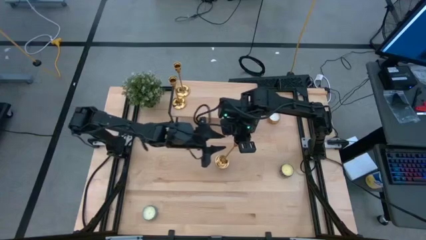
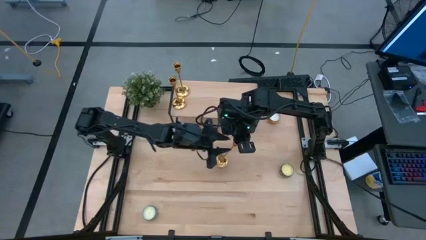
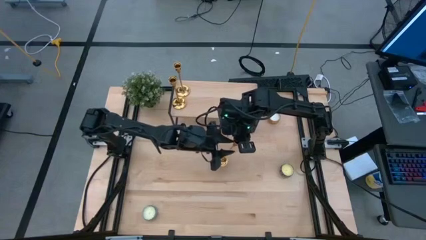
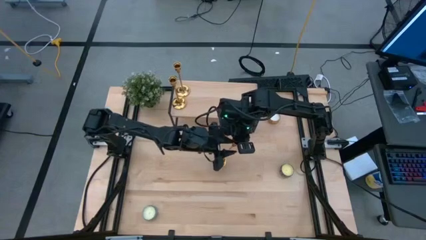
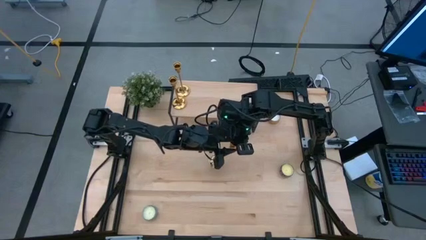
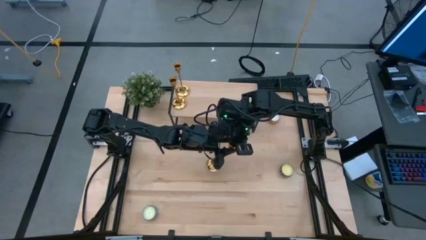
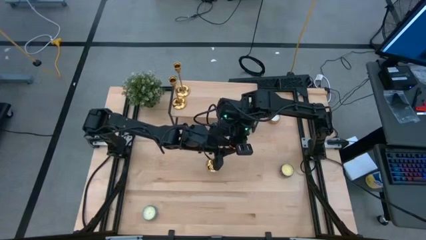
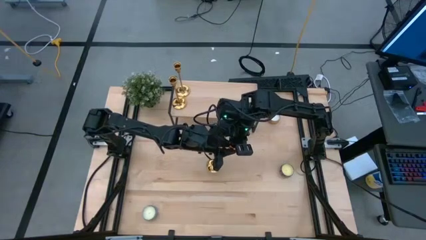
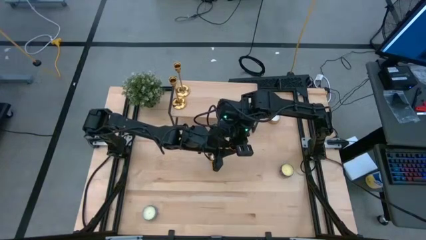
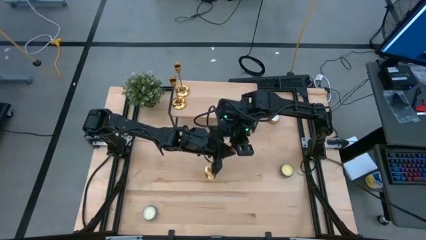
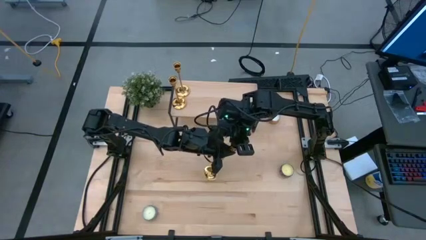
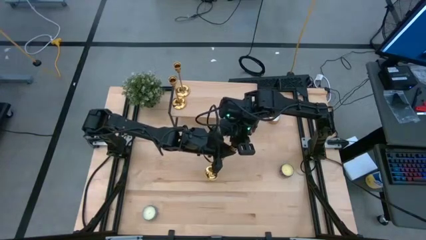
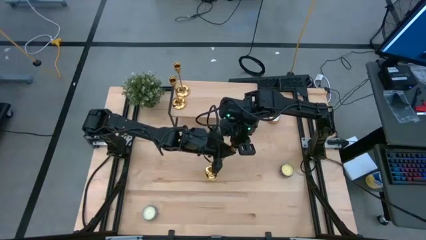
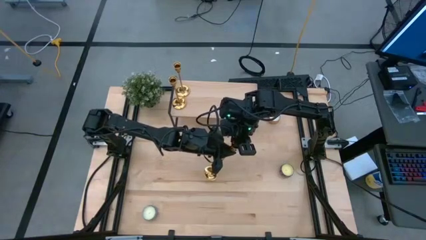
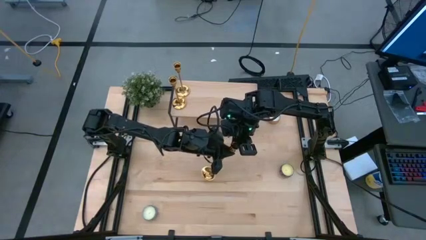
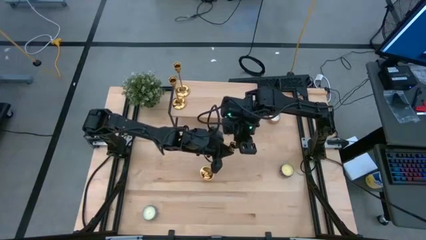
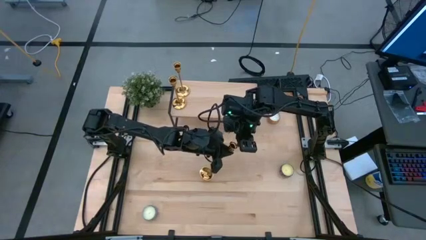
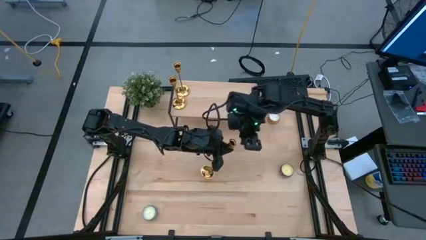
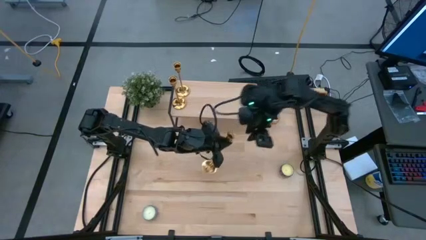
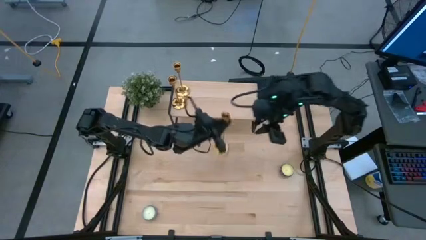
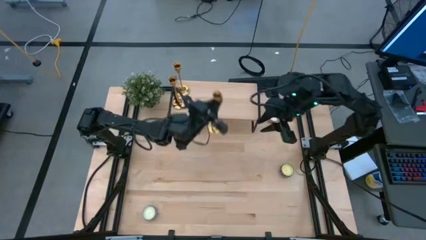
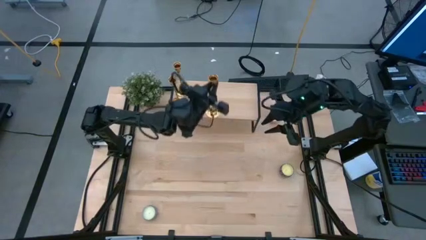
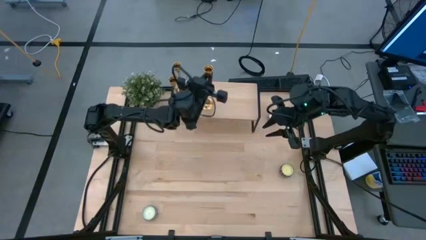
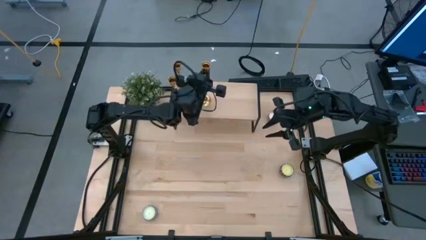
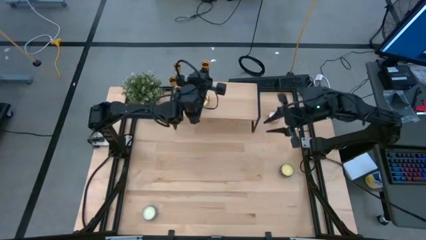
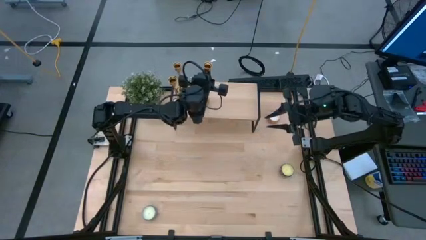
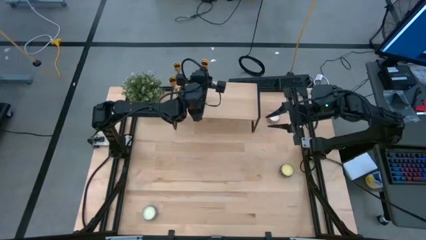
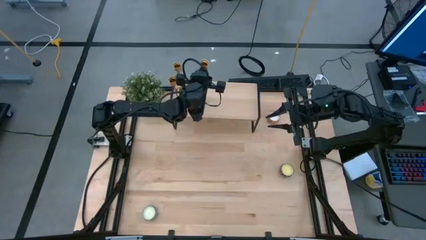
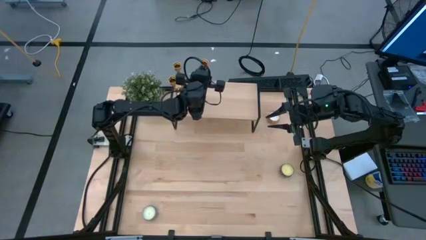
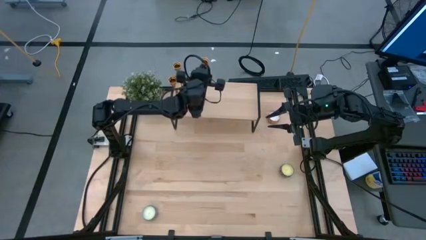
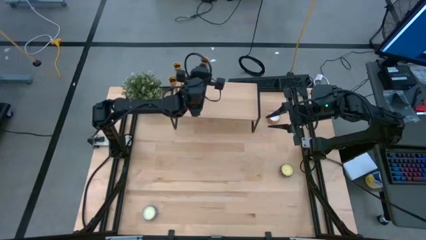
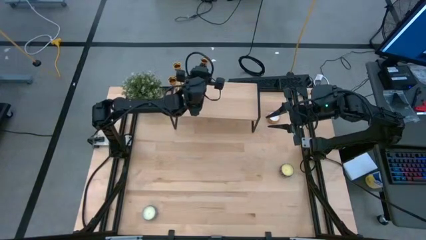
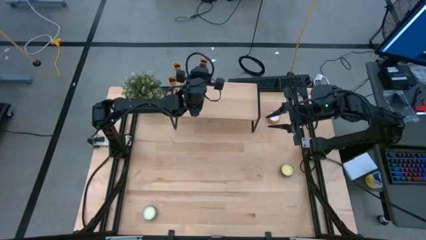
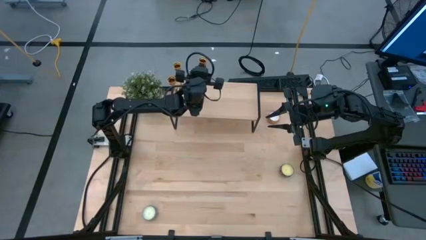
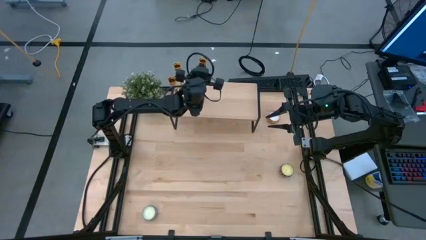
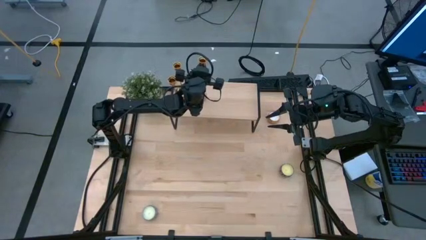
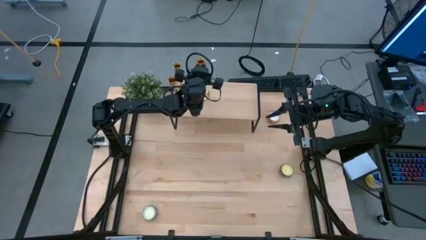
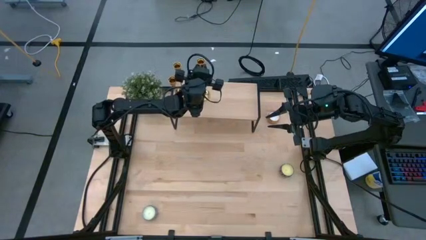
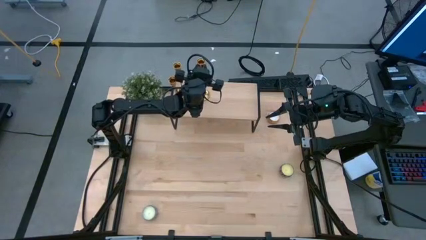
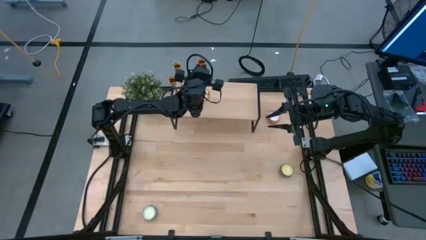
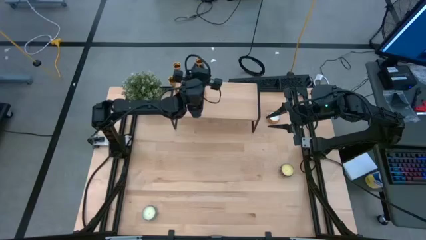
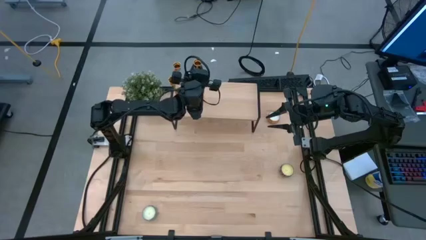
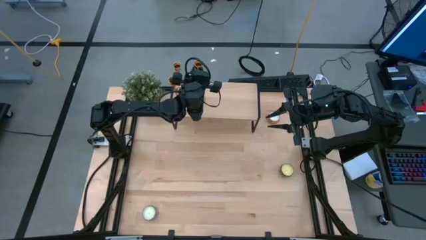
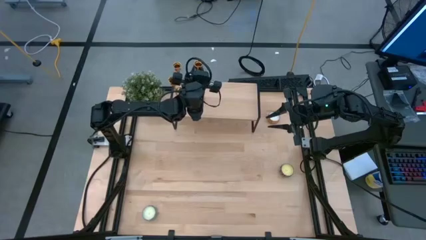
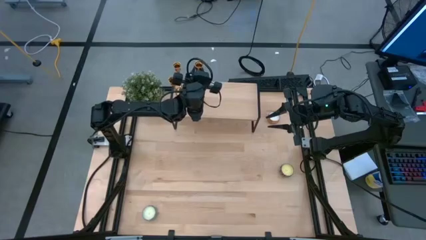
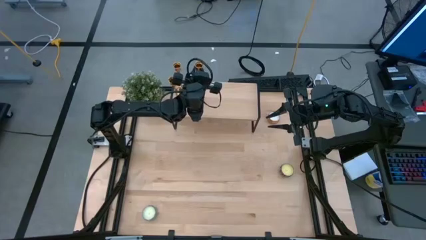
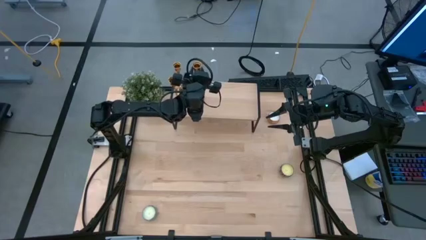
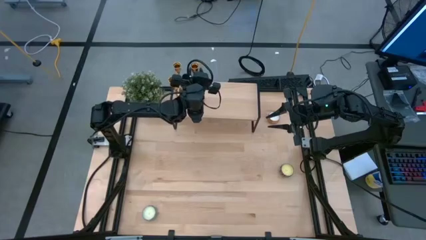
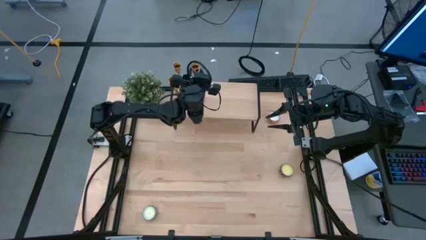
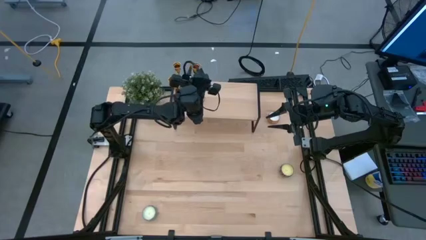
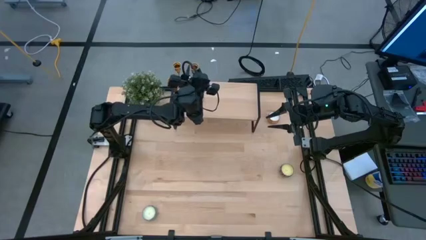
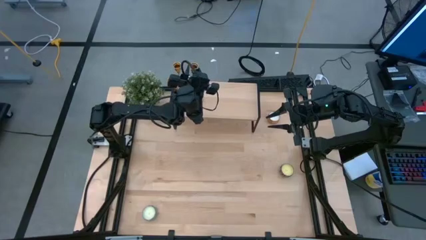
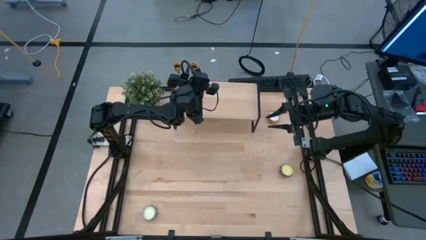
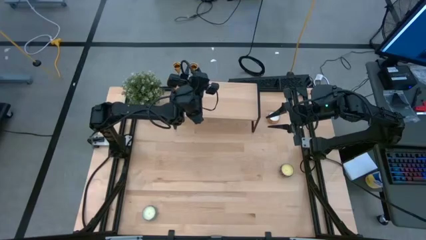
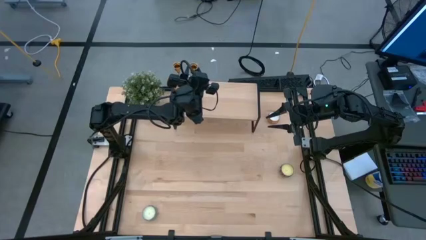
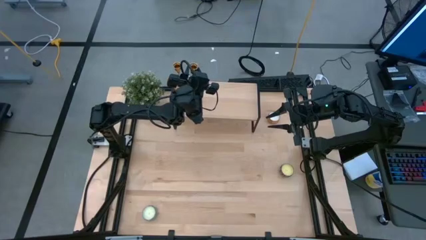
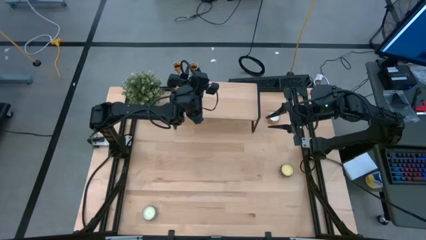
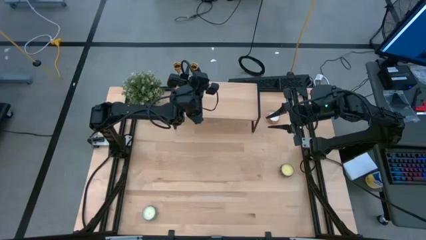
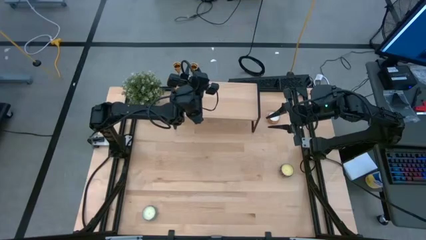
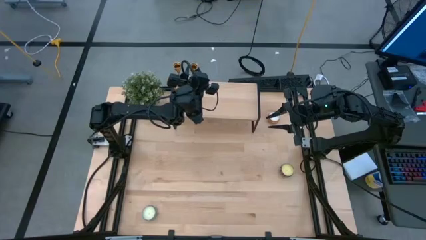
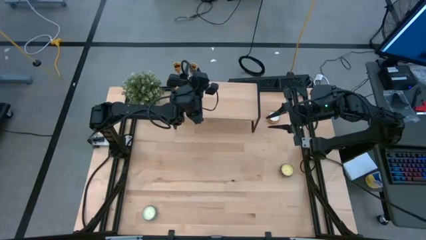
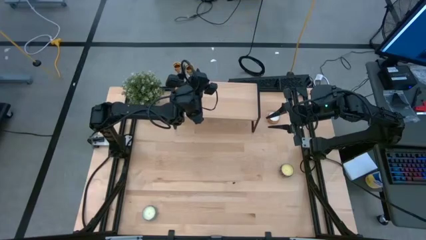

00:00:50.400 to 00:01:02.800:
Task: Pick & Place candle stick holders
Put the gold candle holder on the shelf

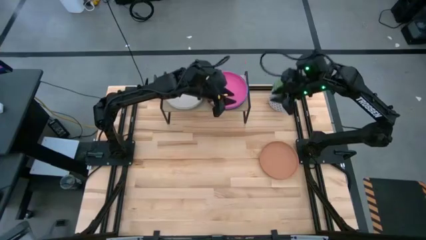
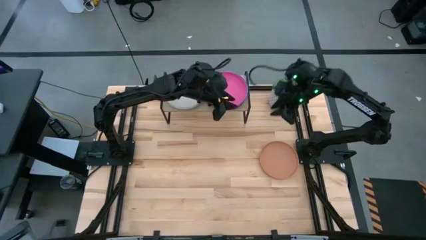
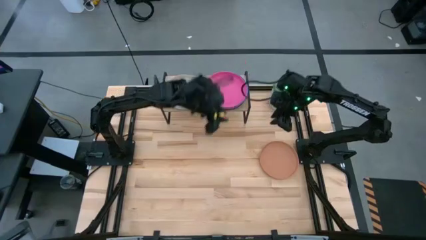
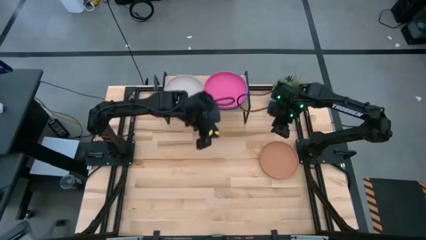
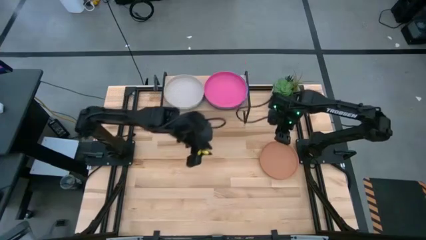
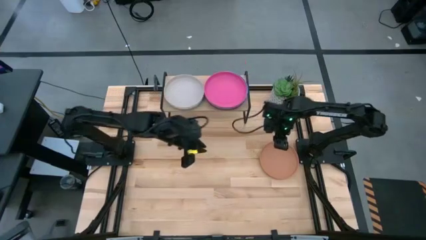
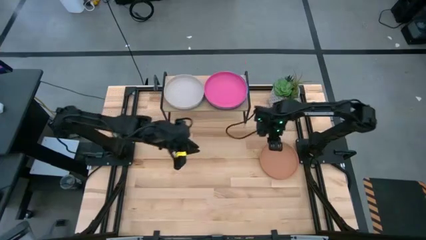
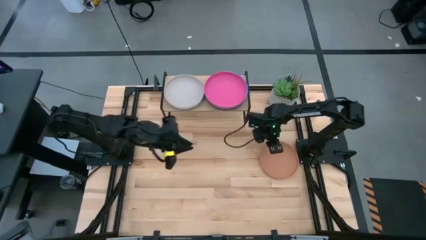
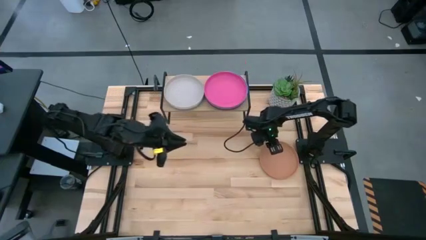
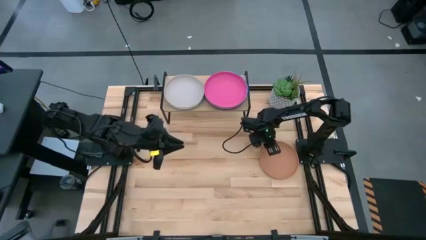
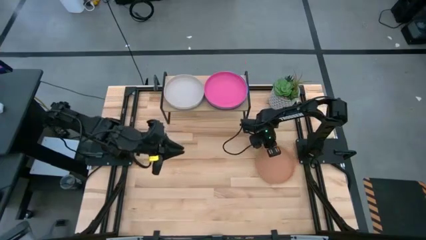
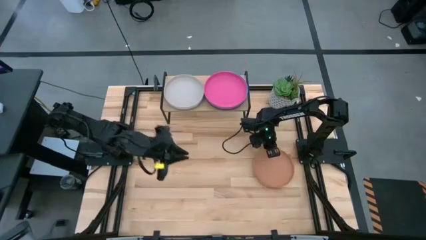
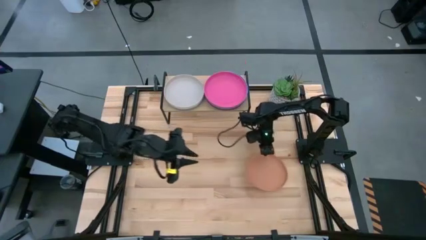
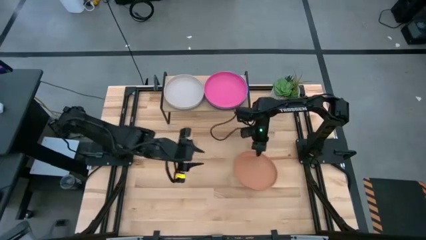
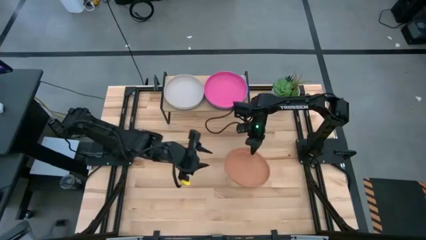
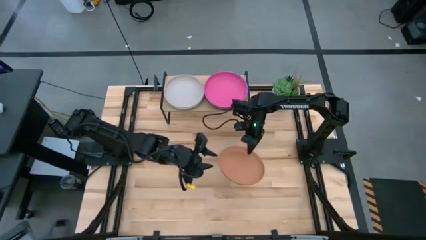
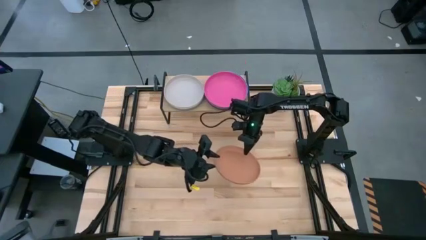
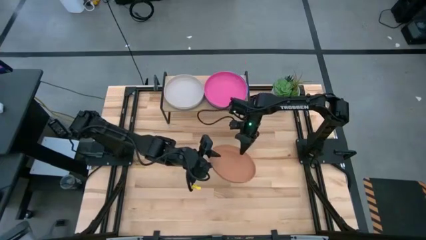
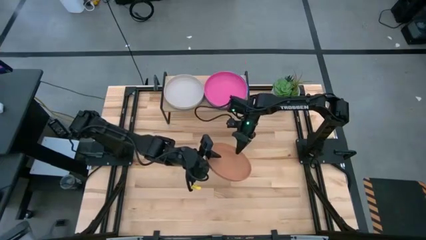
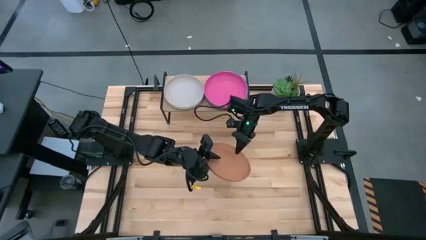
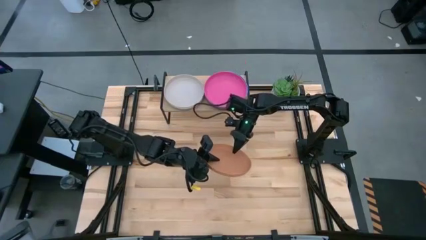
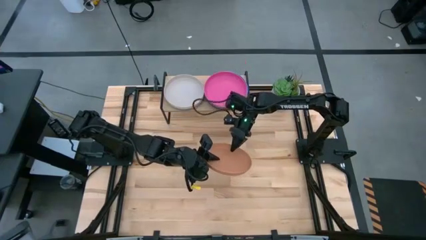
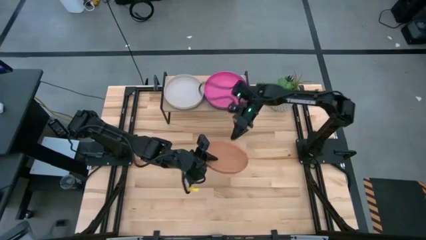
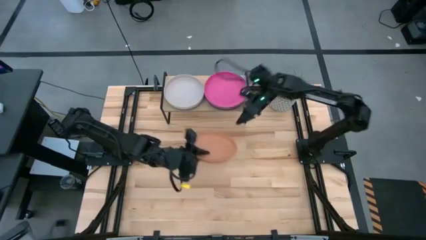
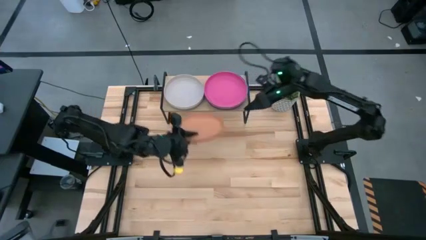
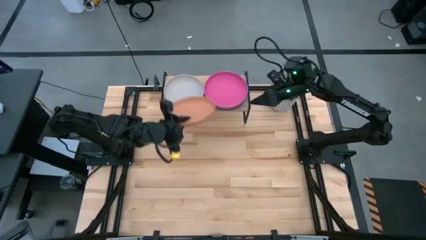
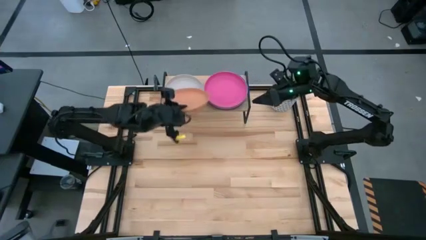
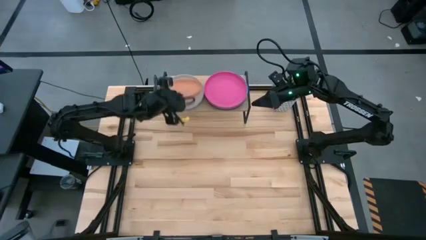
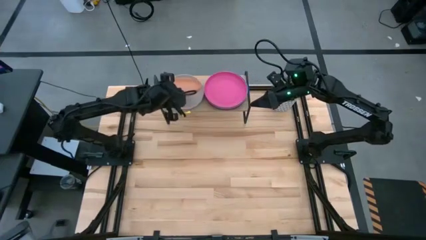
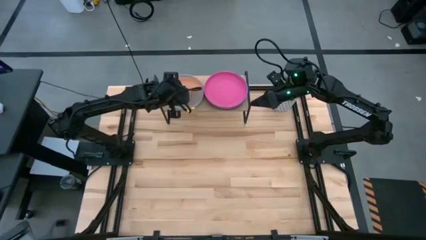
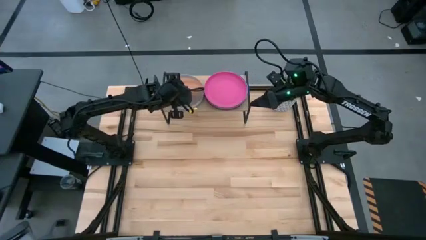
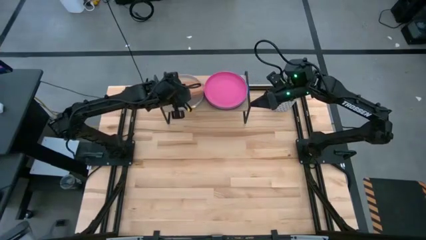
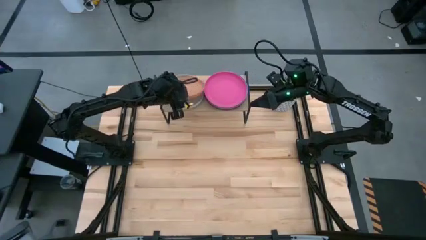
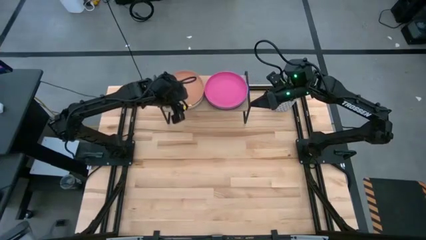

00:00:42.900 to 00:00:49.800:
Task: Place and stack plates onto a shelf
Stack the brown plate on the gray plate on the shelf
